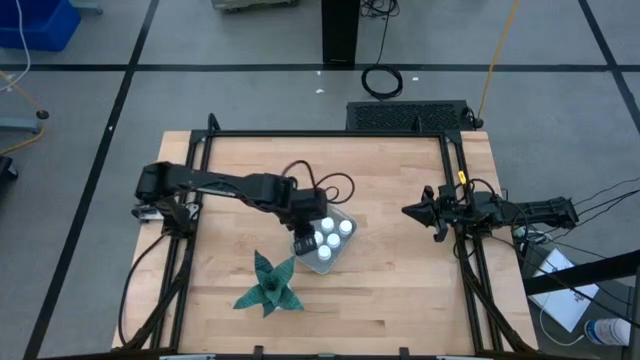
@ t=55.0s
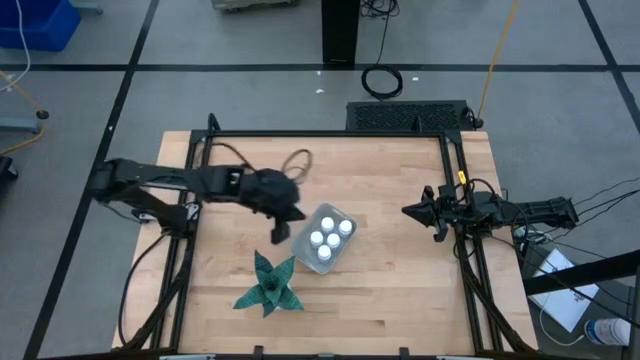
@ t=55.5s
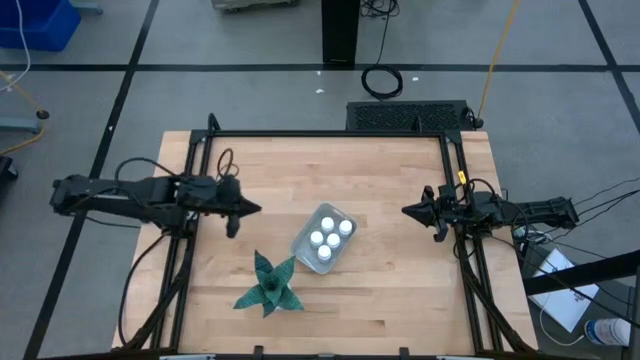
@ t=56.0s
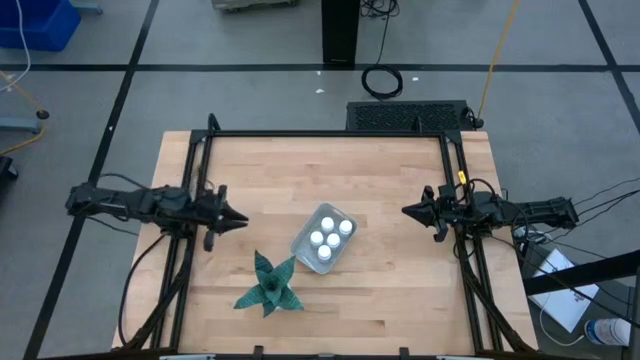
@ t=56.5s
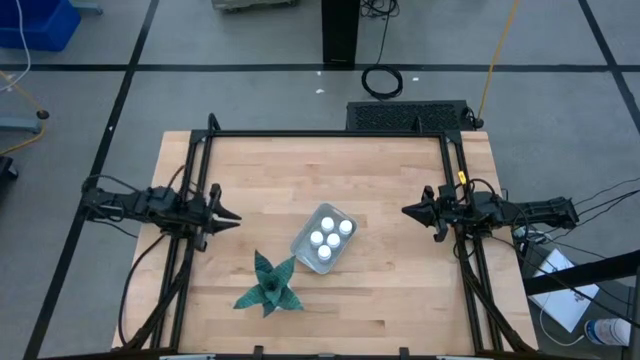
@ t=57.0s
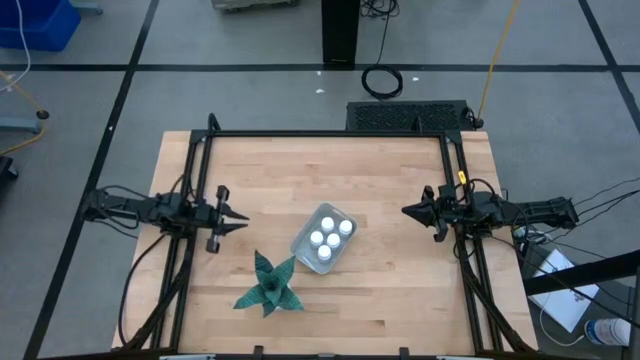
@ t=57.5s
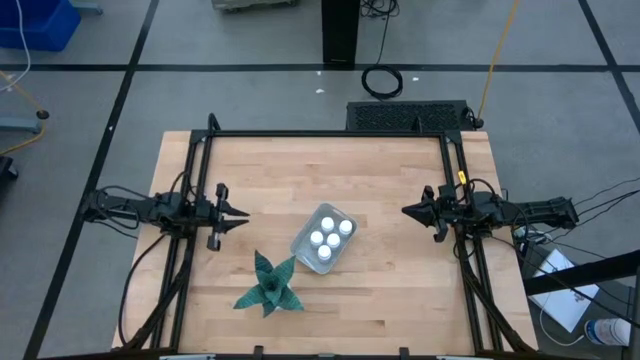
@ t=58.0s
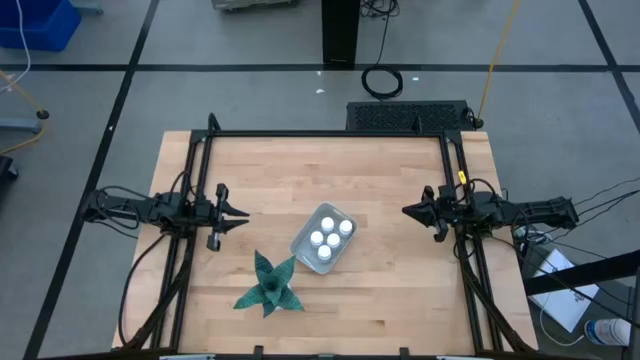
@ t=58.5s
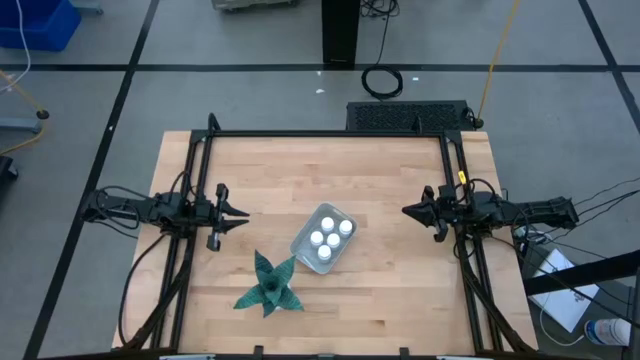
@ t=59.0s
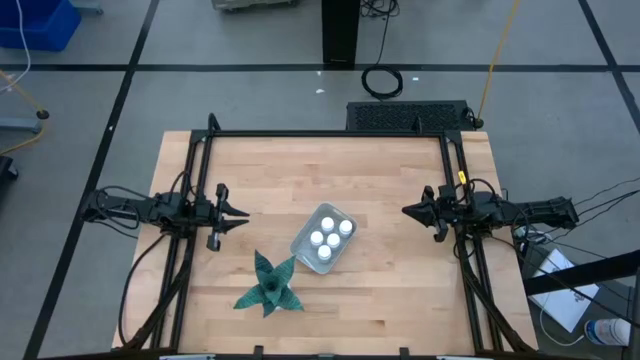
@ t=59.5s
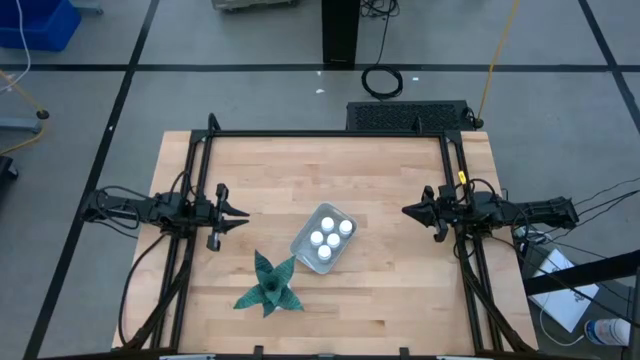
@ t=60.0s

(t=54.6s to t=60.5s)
Task: Pick and place pill bottles into a basket
Return to Home Position

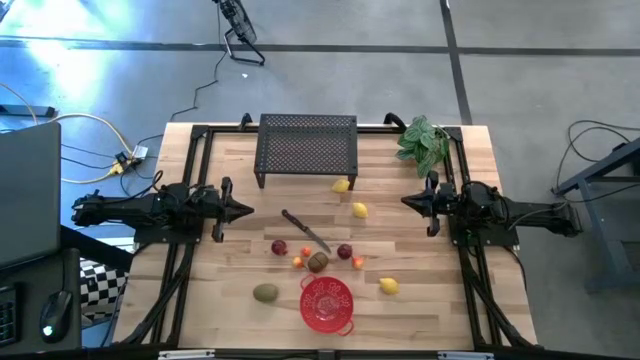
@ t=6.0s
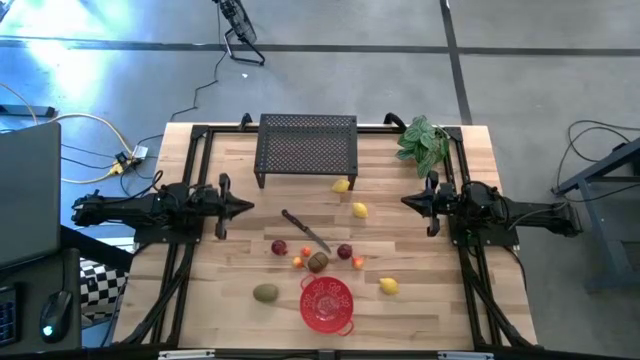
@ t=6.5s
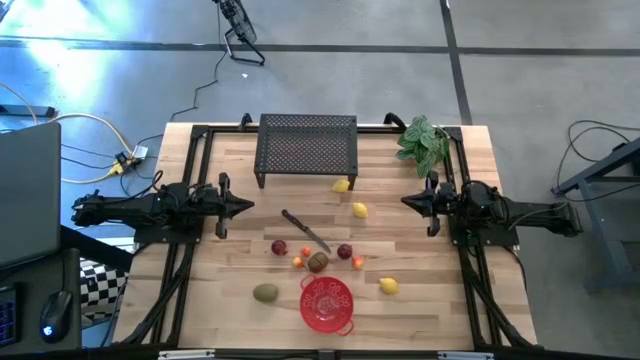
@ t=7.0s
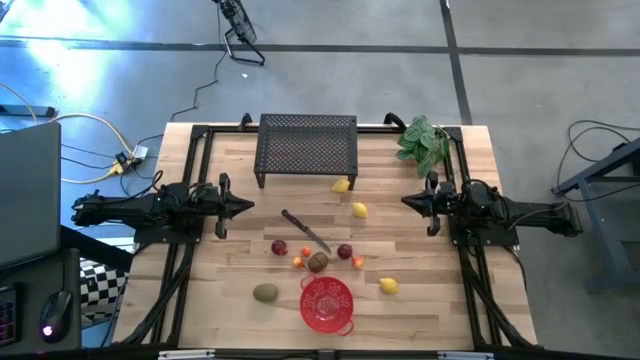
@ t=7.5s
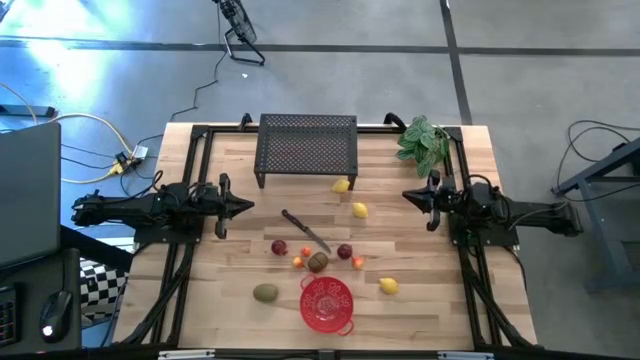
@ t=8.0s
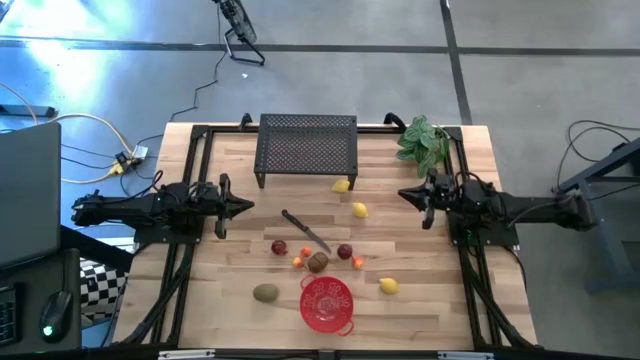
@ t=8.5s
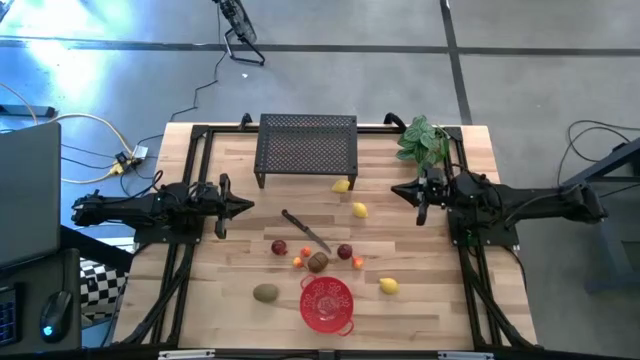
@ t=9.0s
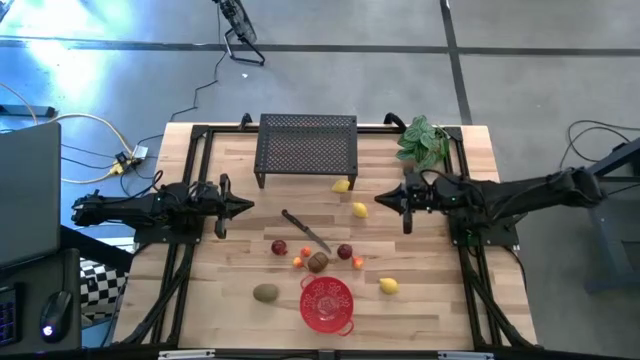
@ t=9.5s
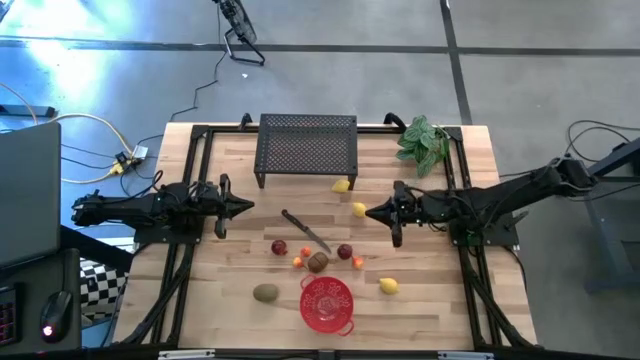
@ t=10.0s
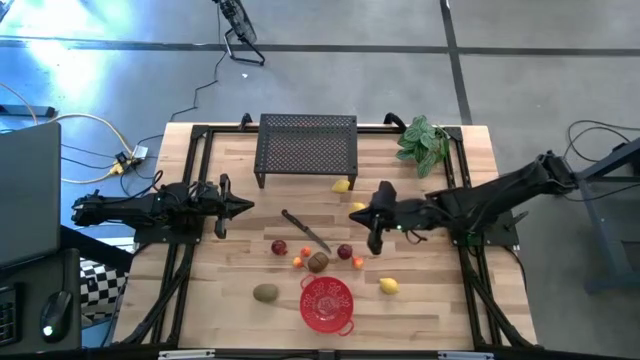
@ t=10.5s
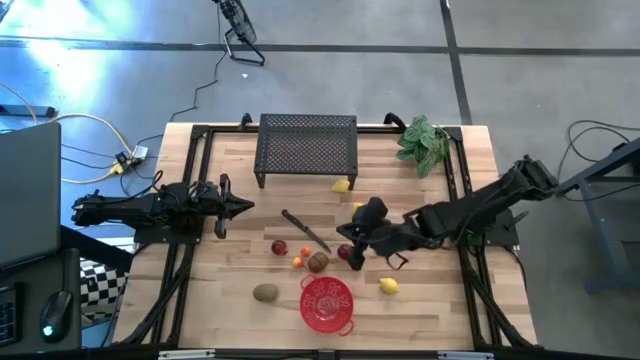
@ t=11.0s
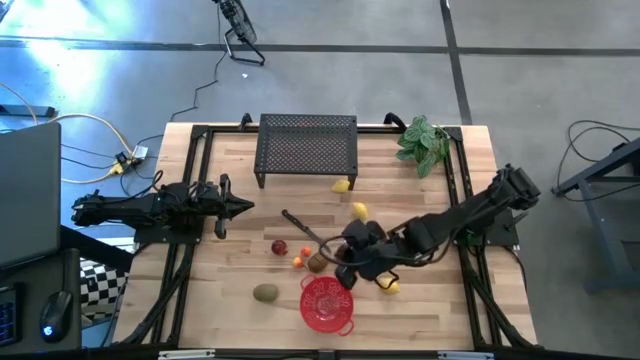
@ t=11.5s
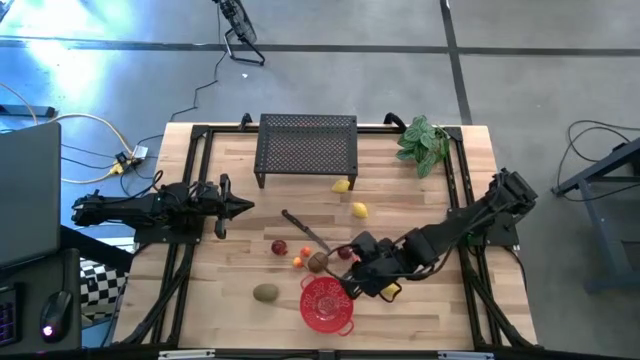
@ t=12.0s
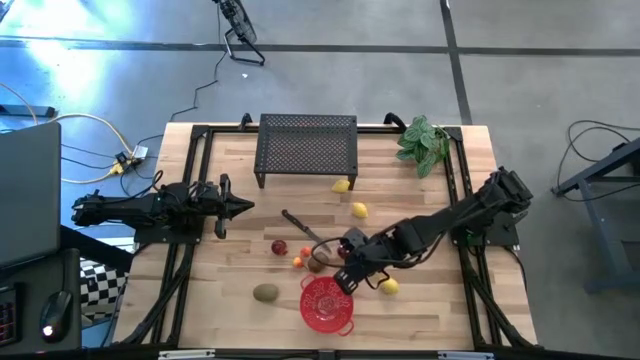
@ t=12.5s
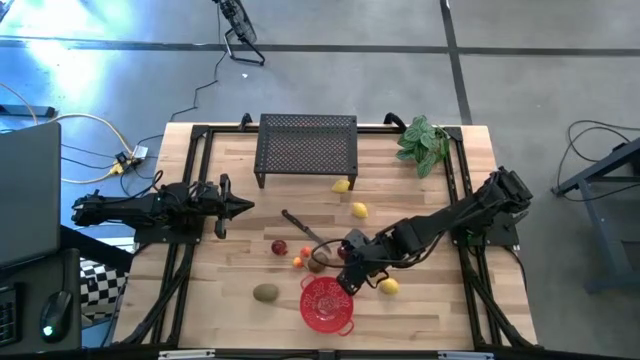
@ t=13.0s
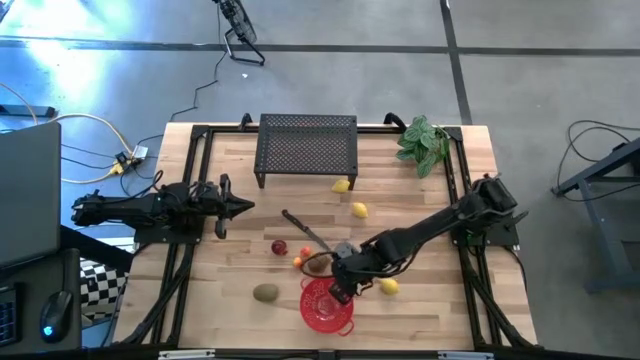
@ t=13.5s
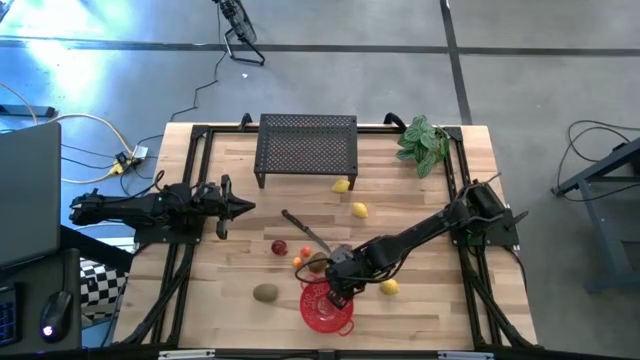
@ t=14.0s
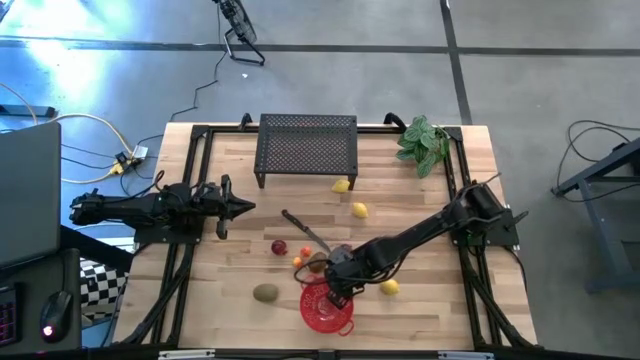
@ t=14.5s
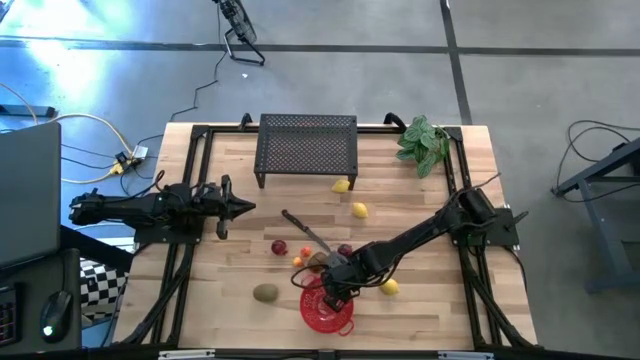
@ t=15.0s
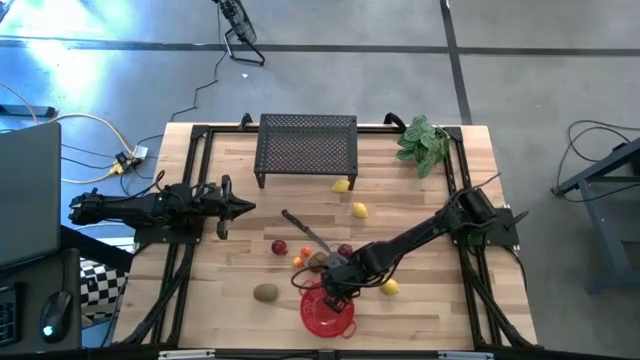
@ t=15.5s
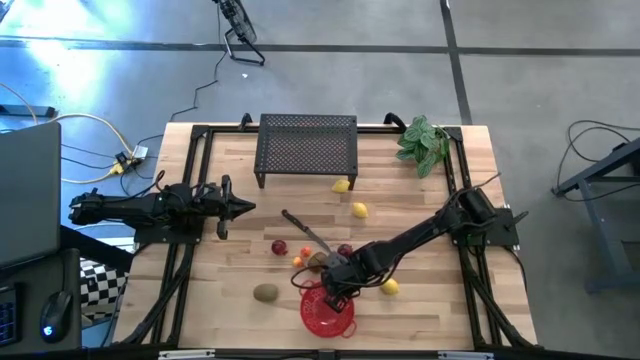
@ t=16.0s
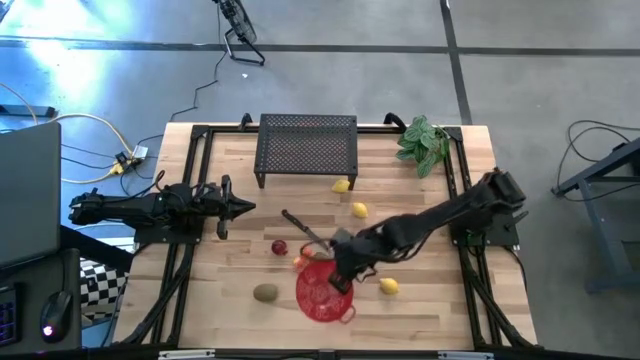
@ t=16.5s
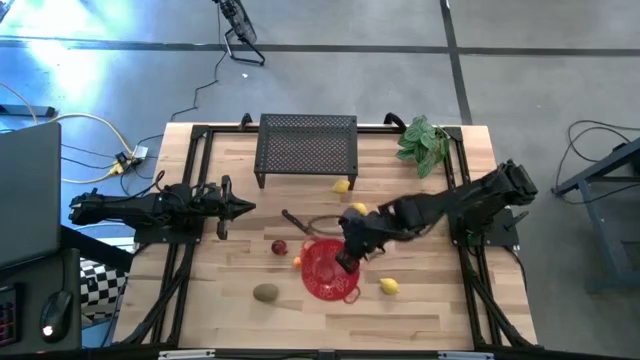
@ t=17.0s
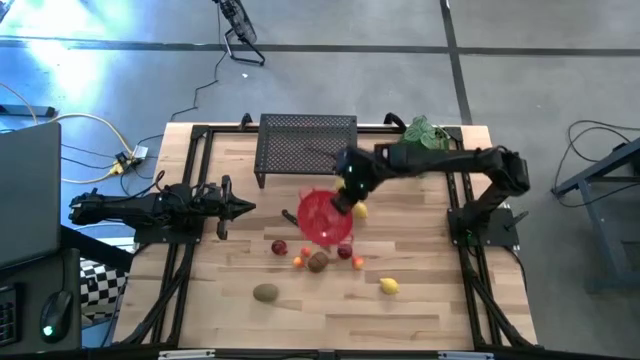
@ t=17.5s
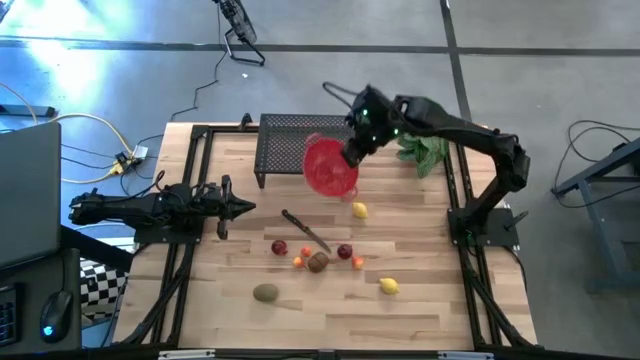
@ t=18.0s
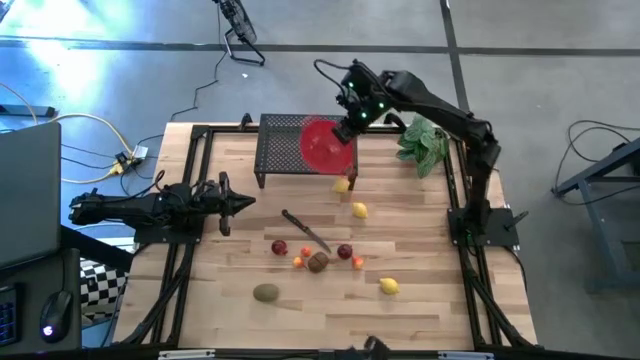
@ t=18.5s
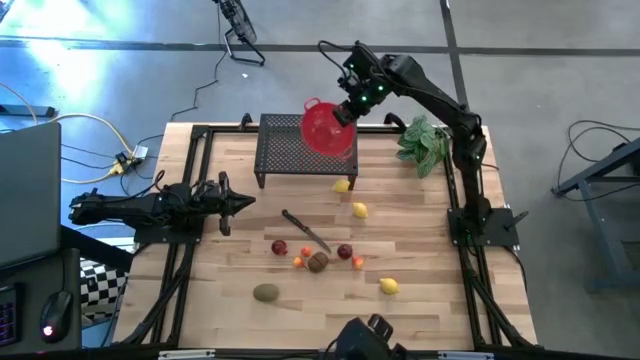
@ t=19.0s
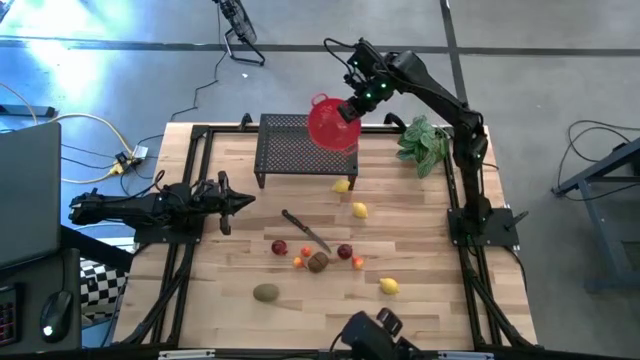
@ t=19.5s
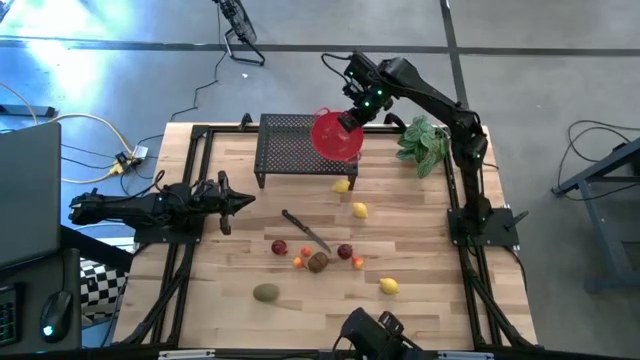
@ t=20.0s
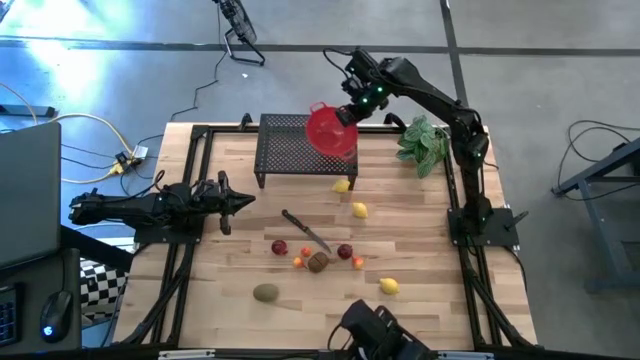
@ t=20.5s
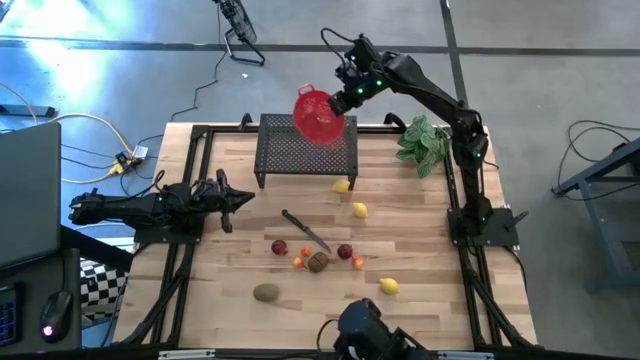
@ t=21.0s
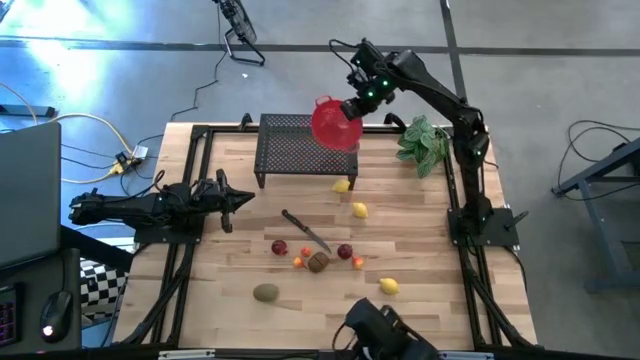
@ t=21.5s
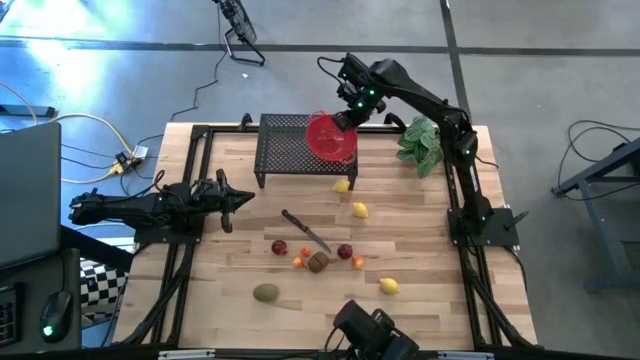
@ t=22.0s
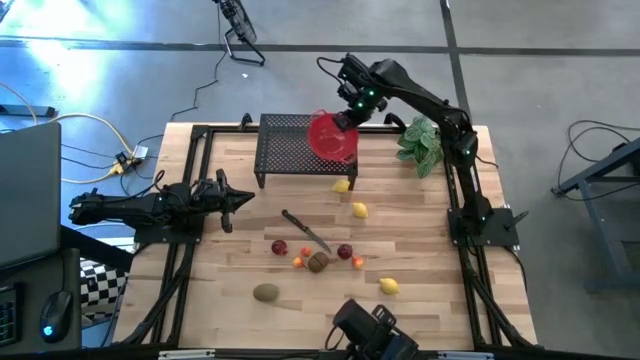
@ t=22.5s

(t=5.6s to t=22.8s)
Task: Pick & Place Fruit
Put the colander on the shelf
